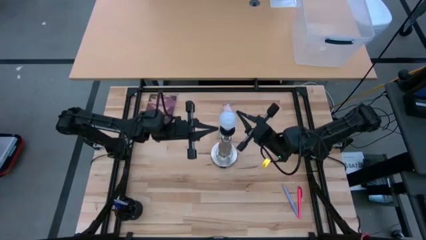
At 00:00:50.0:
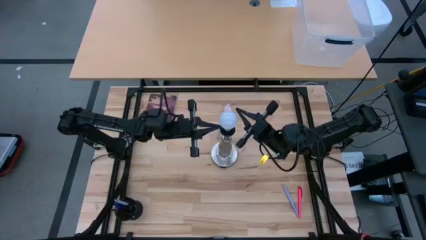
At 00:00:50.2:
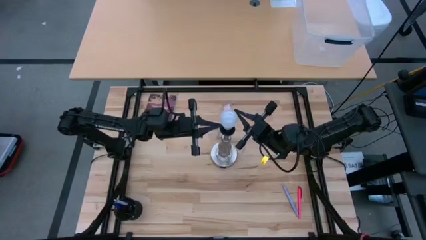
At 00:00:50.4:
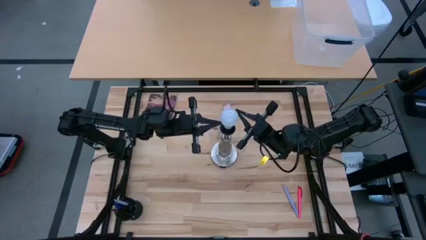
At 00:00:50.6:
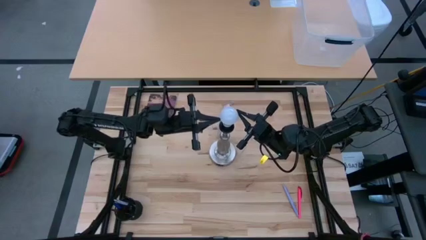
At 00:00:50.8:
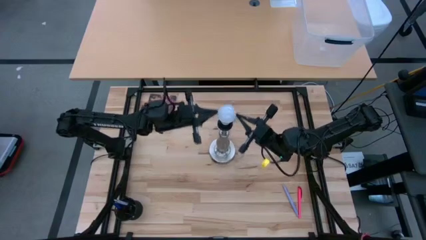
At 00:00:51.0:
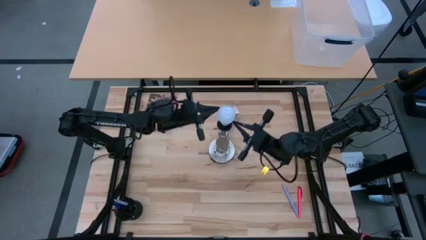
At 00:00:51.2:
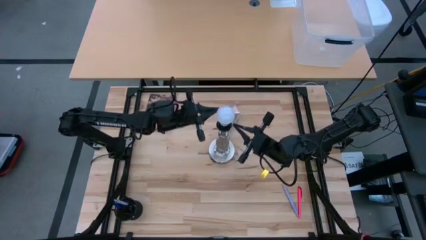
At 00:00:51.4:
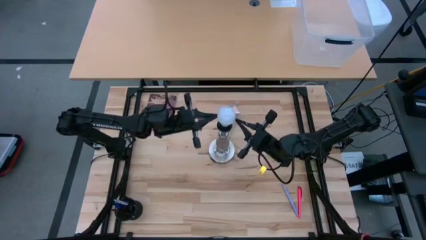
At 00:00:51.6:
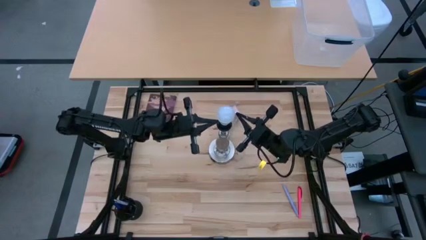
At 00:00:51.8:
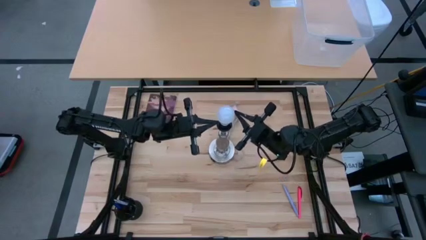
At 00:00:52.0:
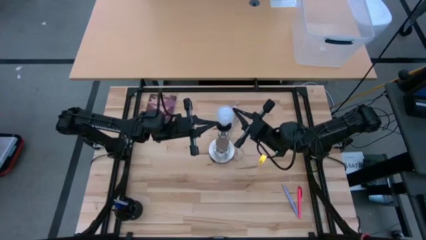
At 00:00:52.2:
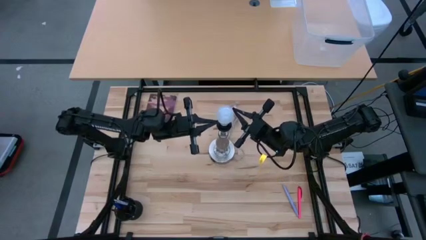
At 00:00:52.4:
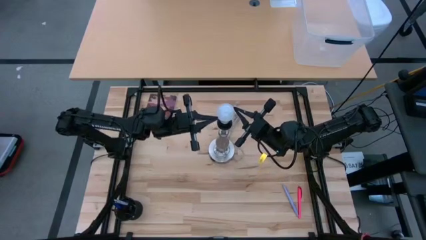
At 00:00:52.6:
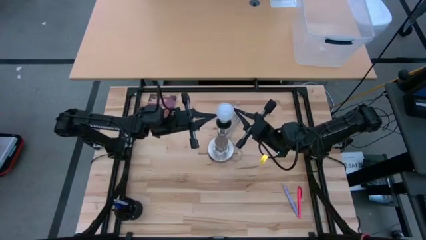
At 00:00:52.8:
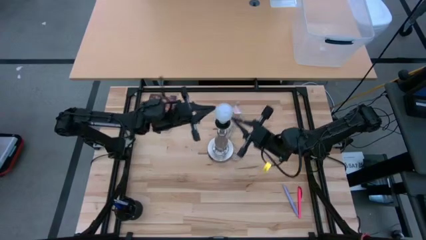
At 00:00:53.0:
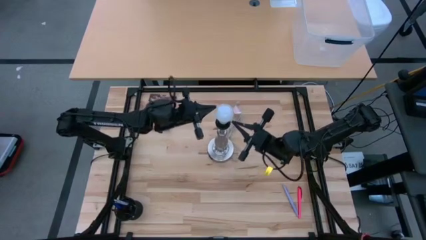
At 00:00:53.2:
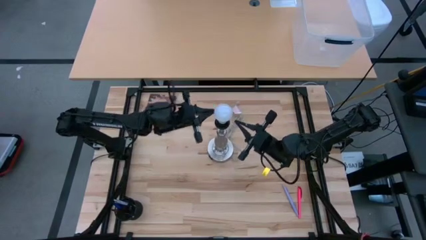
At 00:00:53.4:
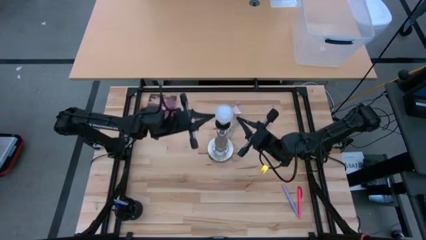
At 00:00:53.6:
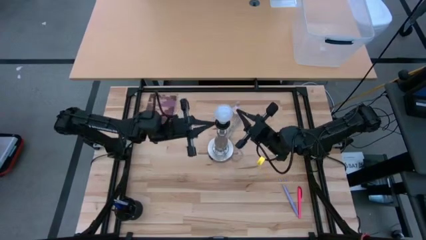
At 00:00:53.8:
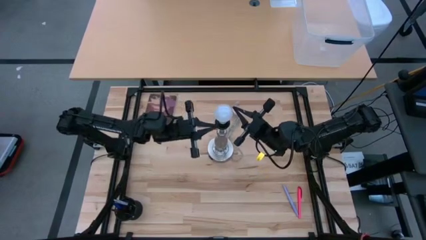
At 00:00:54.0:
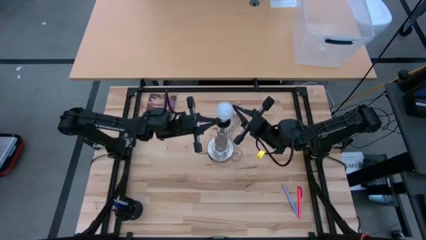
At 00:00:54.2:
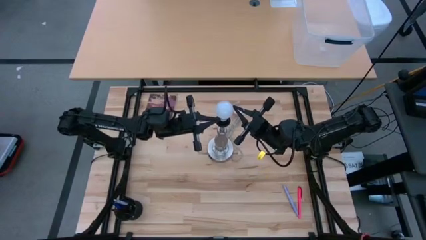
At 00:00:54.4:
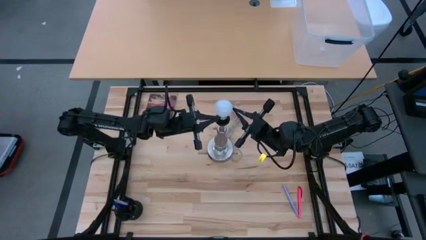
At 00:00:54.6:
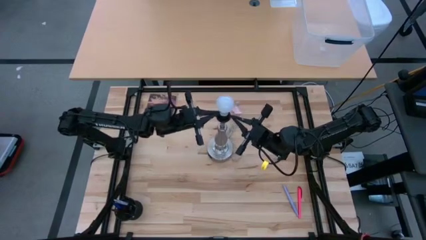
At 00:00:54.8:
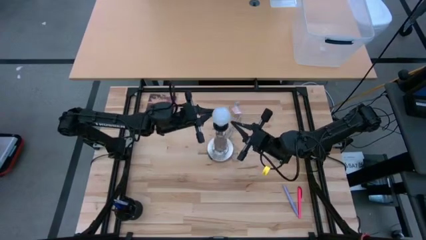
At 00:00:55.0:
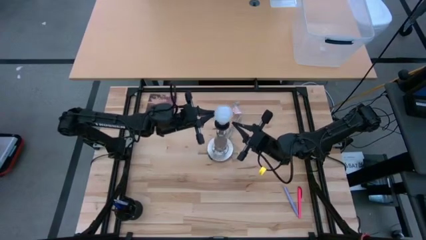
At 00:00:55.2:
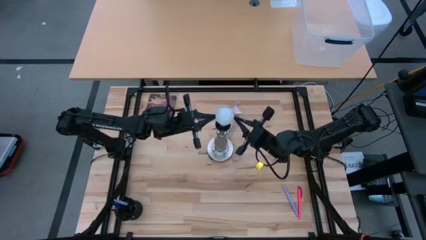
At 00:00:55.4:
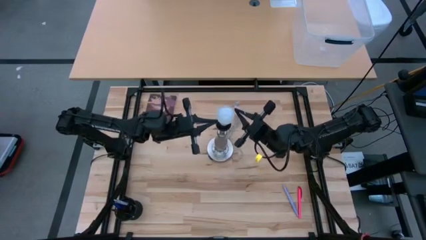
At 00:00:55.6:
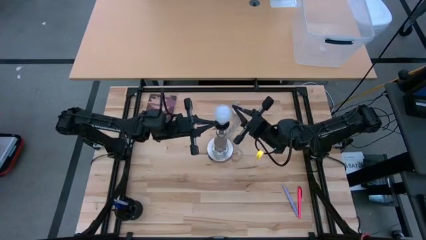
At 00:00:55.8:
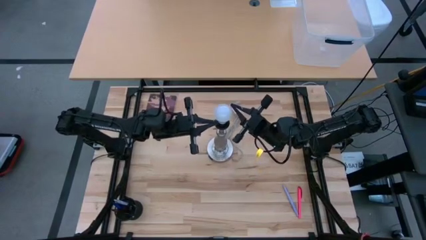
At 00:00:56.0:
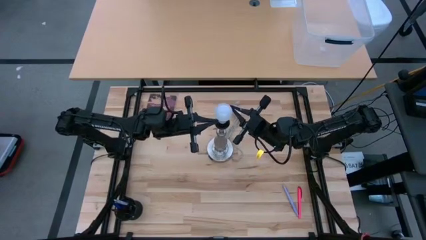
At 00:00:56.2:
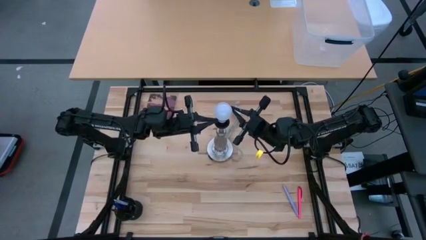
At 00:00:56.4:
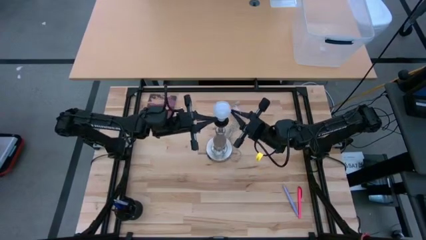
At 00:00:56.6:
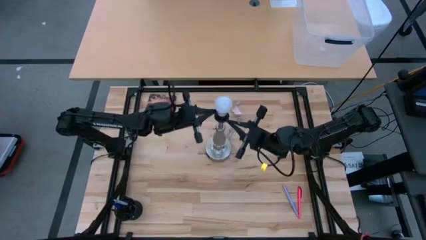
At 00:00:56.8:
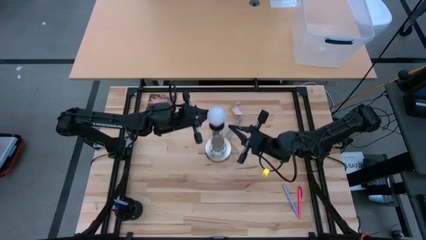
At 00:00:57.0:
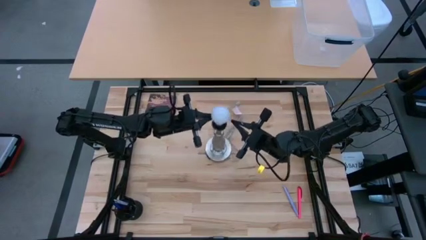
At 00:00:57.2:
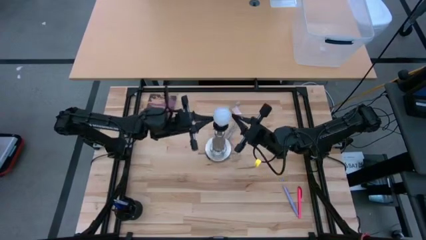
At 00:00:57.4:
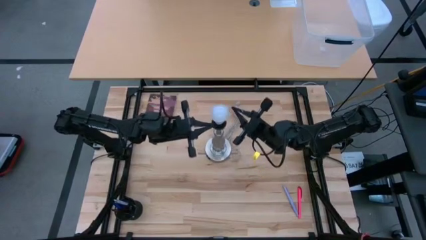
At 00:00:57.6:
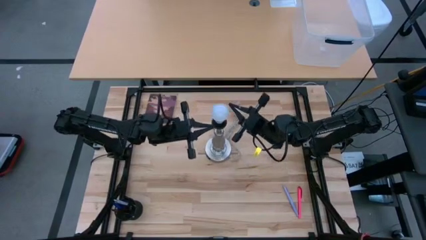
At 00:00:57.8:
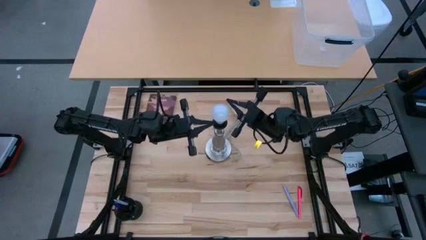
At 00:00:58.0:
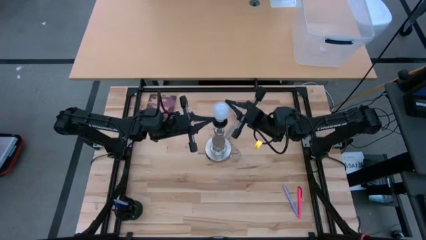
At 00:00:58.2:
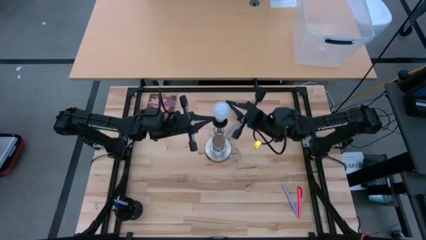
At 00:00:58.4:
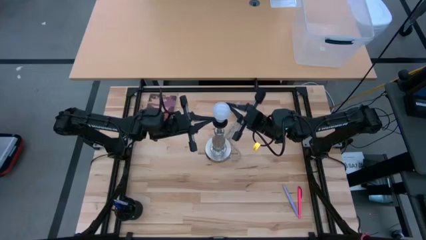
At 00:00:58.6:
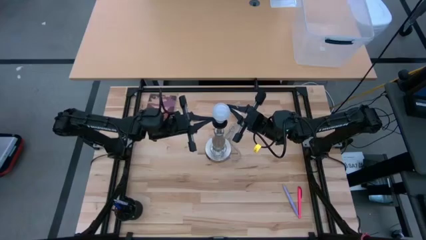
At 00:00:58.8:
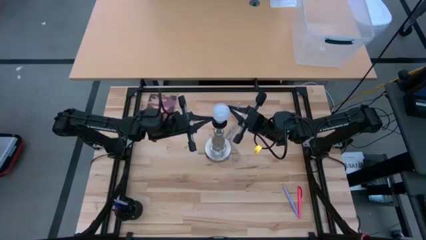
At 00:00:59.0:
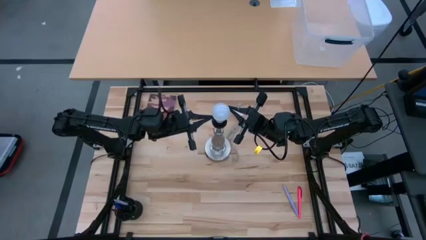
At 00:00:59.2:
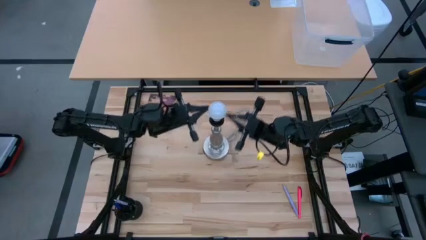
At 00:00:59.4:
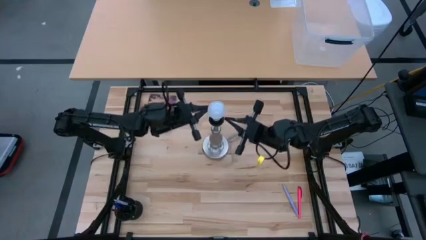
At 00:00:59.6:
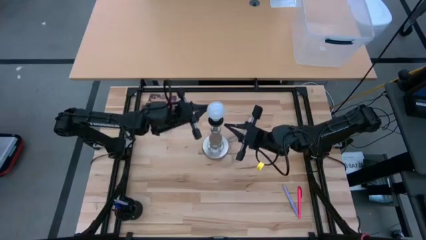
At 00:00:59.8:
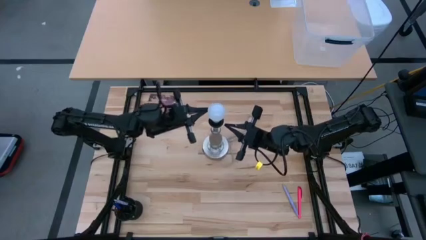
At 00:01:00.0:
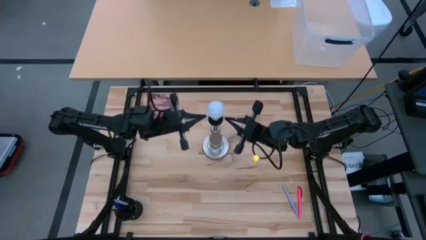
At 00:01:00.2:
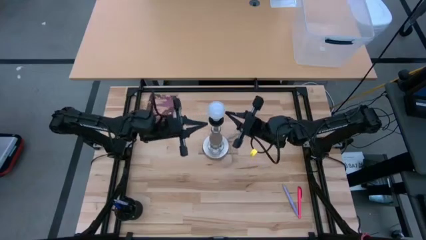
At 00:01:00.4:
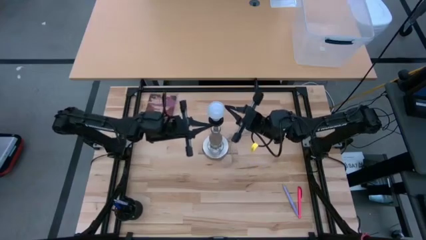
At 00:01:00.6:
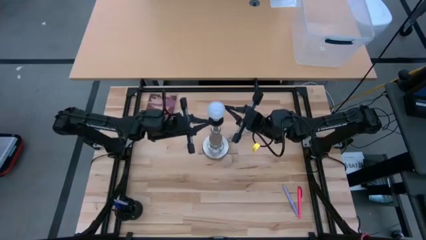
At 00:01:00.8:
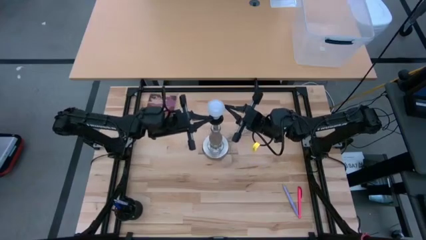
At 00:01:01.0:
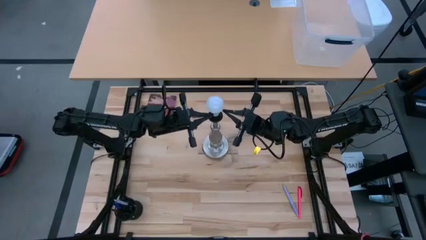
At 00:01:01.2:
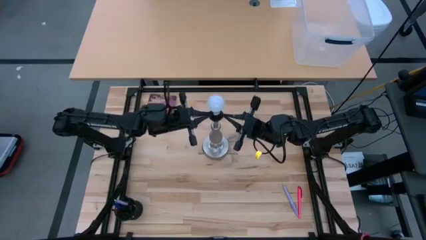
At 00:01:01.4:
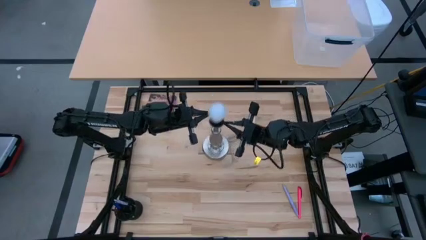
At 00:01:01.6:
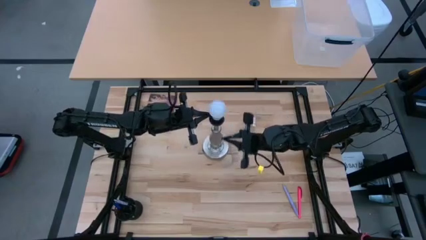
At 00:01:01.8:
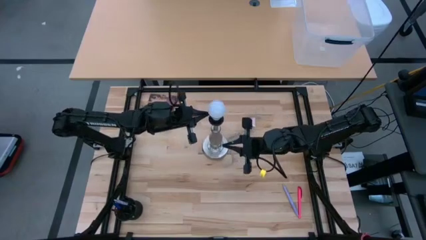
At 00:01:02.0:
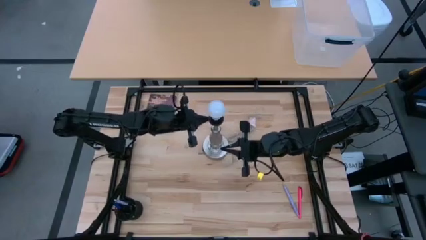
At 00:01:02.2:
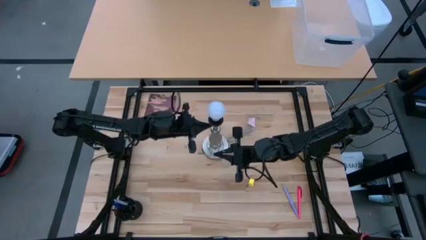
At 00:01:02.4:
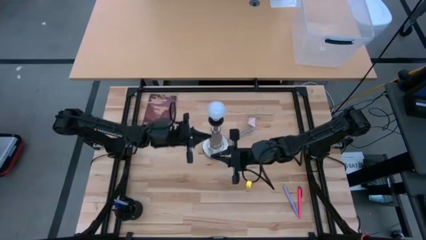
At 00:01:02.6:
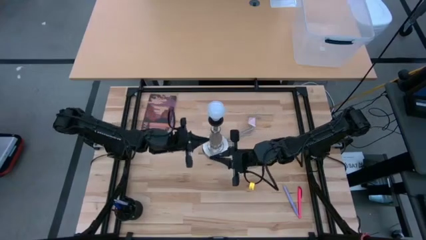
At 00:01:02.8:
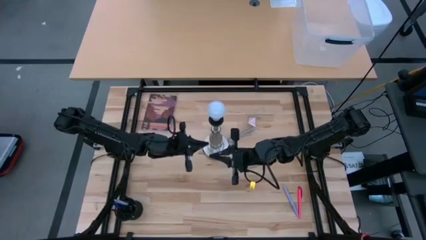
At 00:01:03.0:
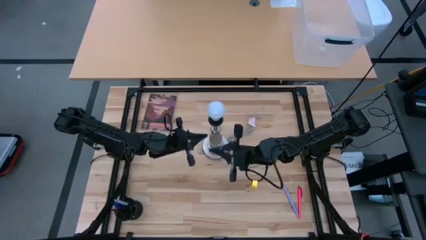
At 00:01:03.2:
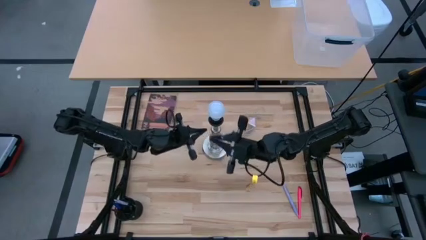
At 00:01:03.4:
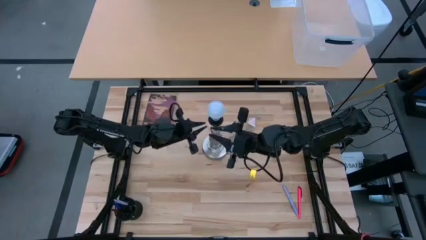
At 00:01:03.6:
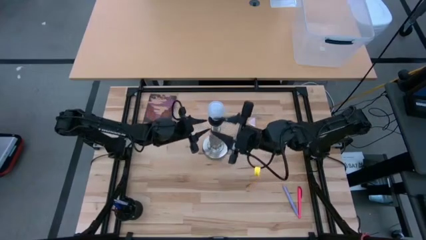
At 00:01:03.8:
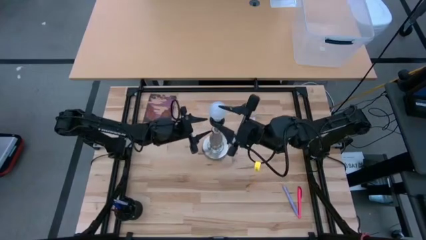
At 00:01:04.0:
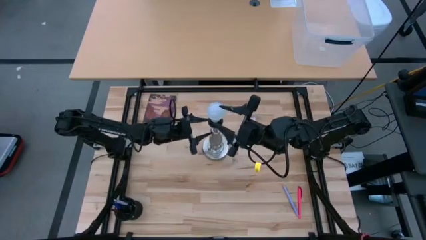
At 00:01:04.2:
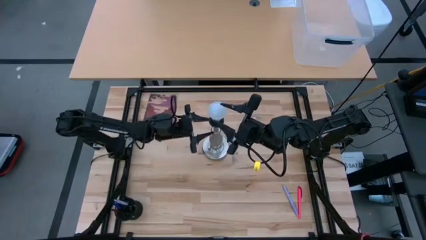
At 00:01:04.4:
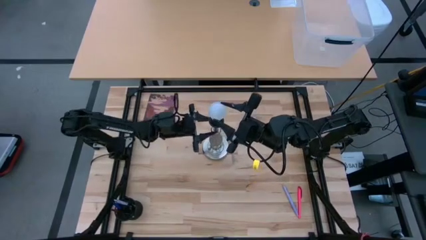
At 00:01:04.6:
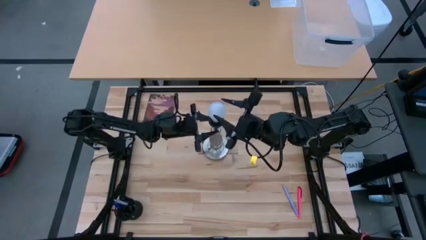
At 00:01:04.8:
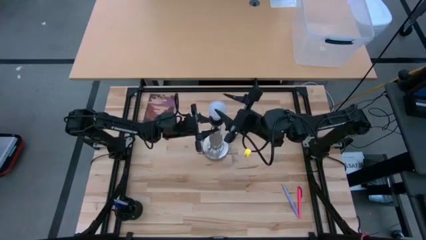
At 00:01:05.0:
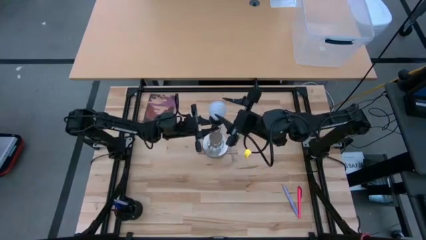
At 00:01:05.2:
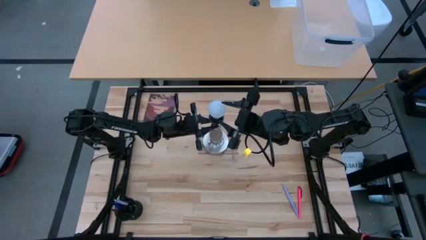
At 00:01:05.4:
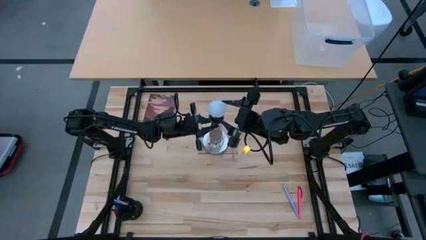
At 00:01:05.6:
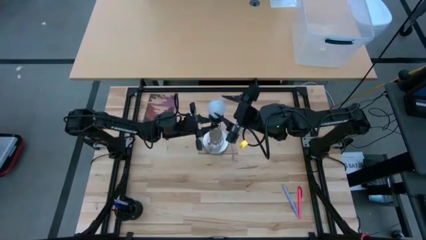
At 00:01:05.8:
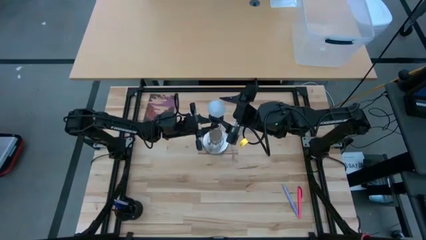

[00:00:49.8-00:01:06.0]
Task: Screw lightbulb
Insert the lightbulb into the lamp
